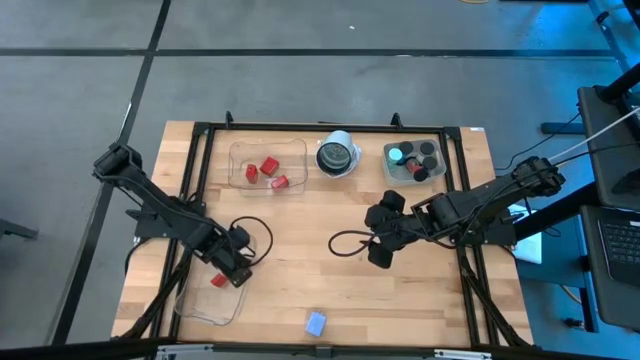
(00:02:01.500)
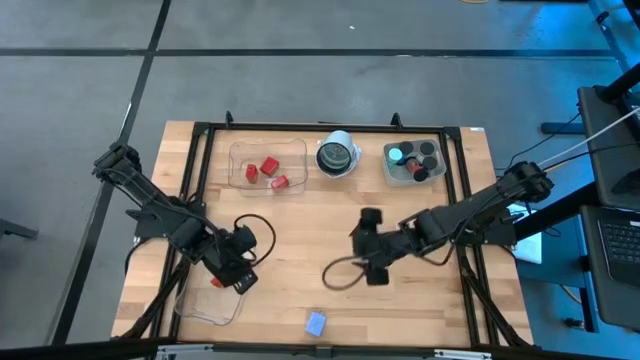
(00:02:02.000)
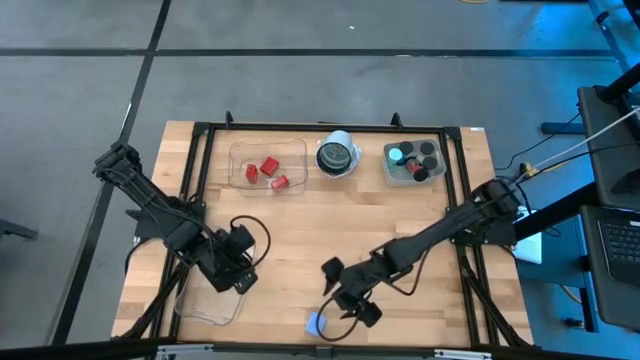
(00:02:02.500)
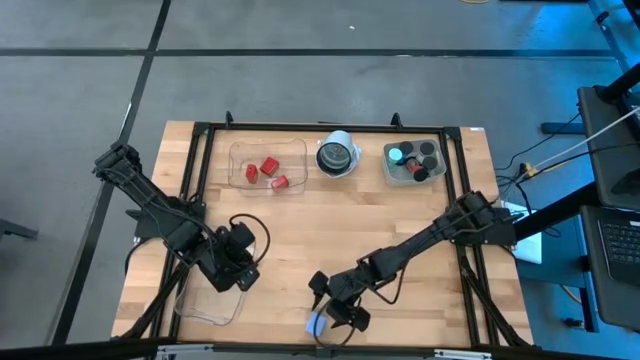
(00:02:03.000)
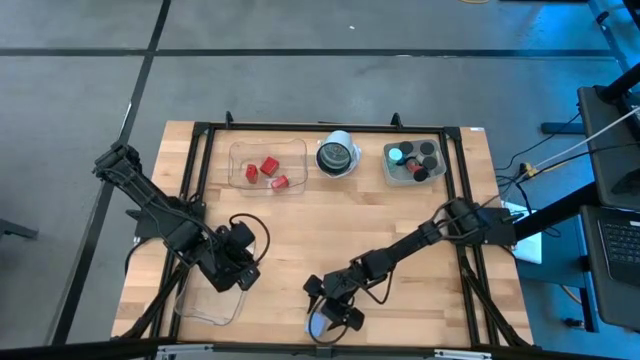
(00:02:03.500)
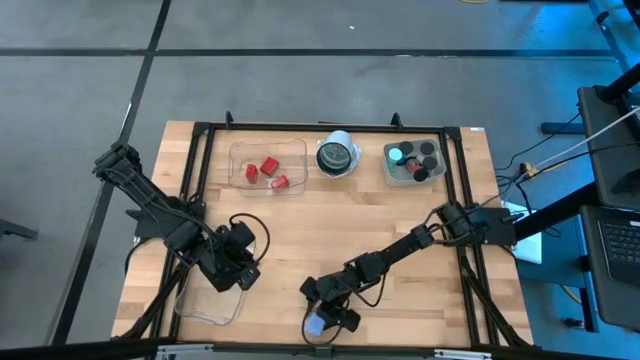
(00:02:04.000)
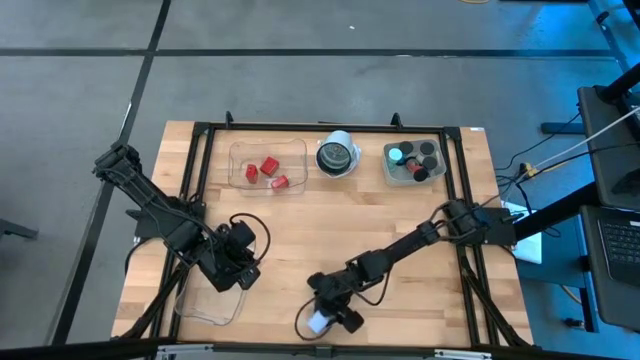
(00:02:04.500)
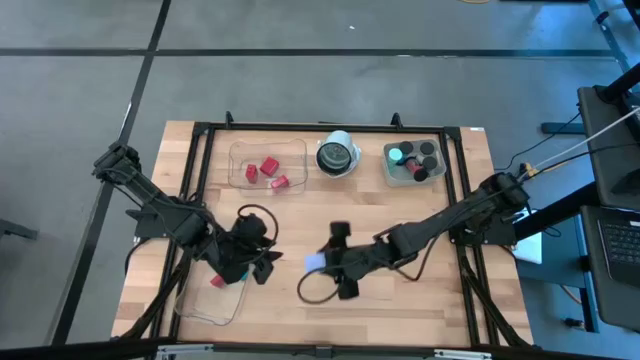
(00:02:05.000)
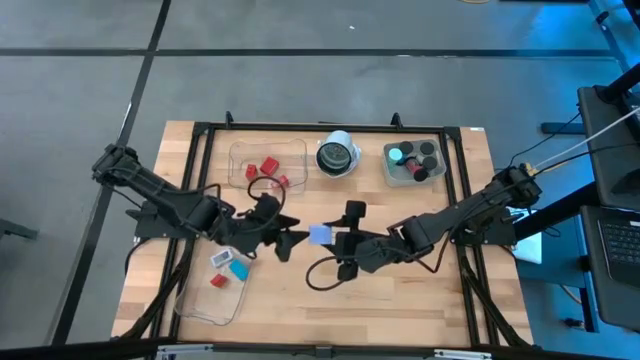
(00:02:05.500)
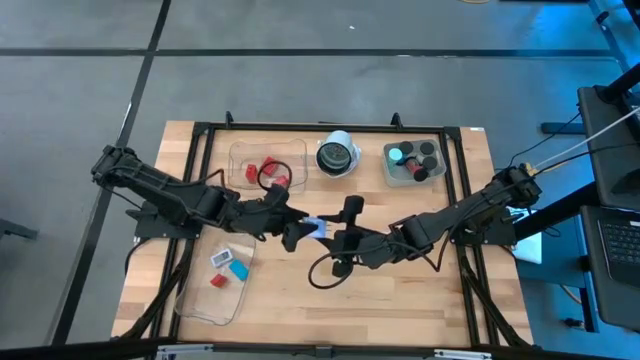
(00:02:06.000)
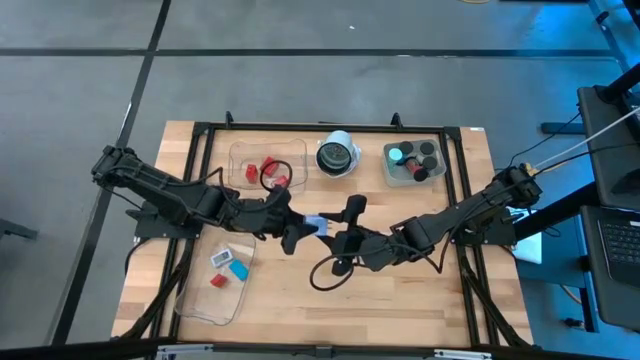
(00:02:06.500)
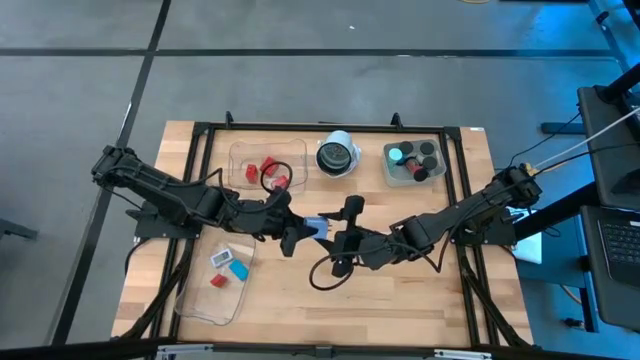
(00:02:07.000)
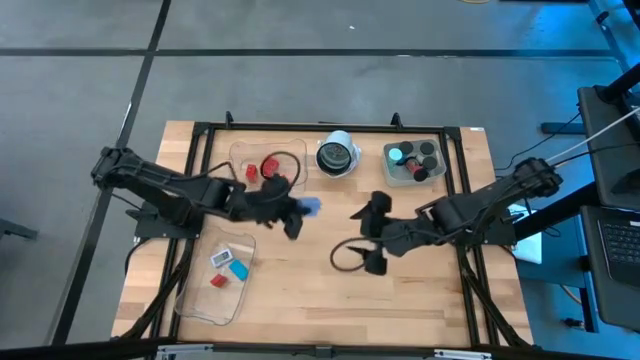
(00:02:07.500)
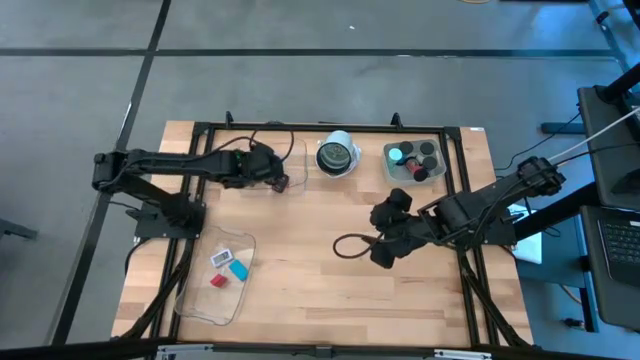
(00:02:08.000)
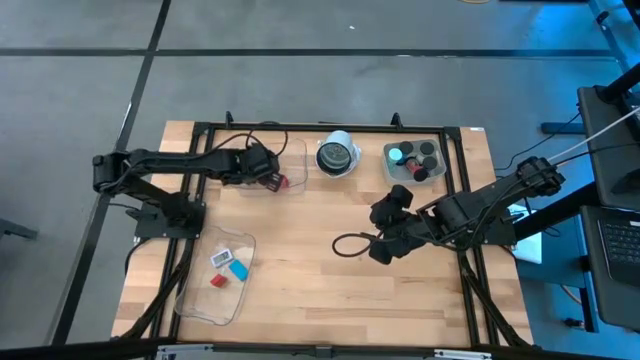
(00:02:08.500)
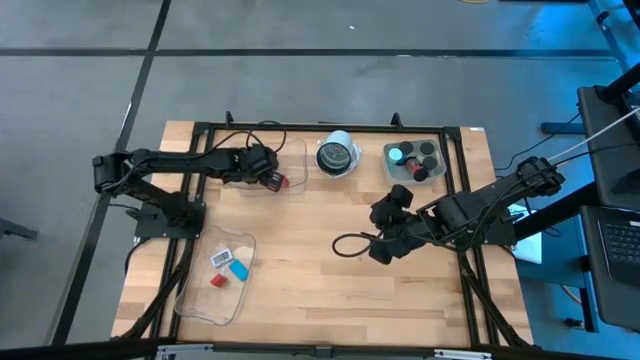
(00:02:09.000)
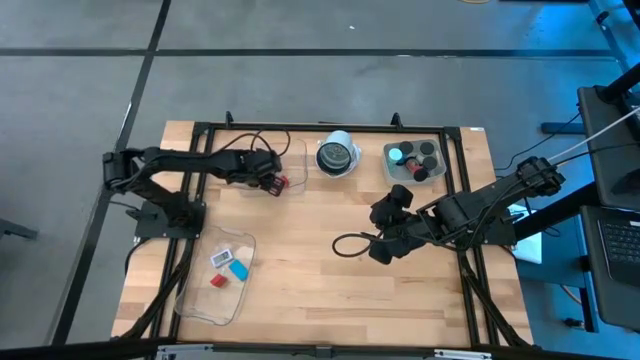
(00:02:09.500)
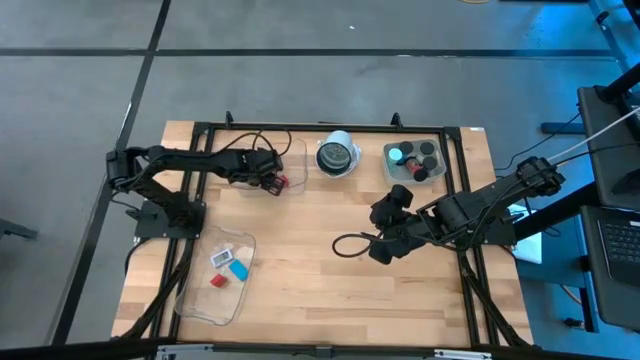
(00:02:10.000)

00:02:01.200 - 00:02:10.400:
Task: Pick & Place Office items
Put the light blue charger adapter into the top transparent bin

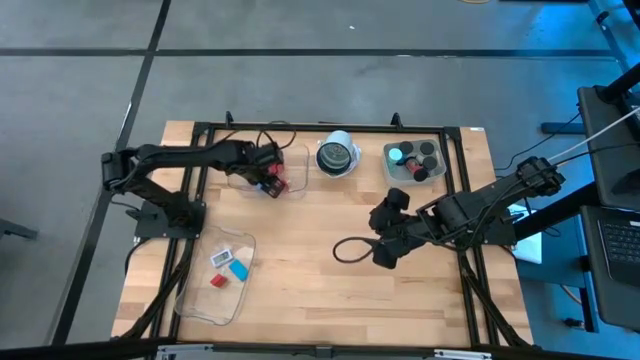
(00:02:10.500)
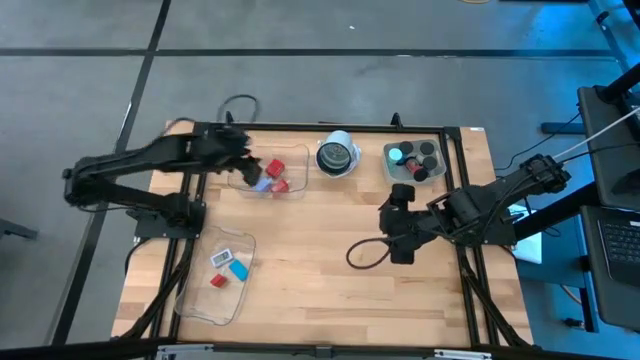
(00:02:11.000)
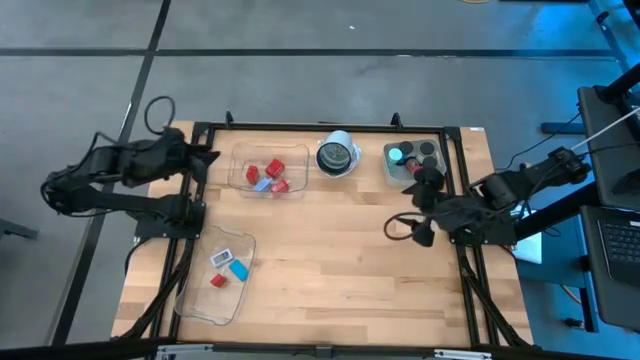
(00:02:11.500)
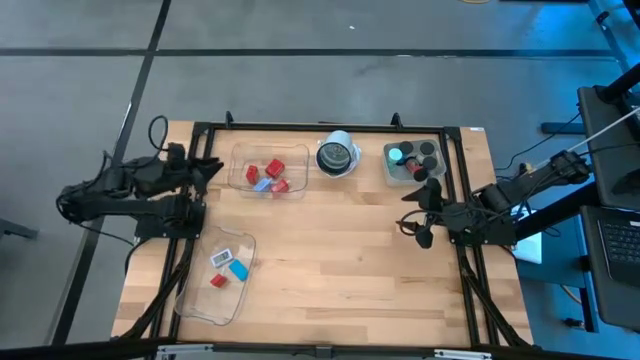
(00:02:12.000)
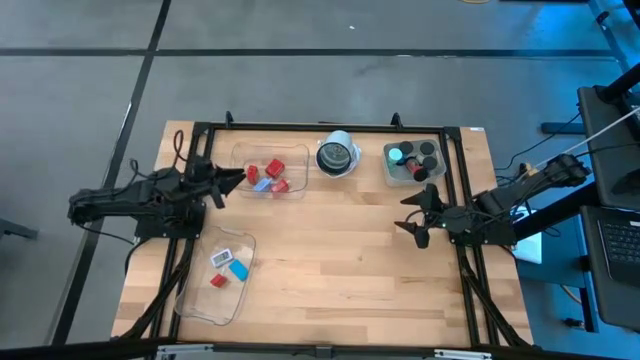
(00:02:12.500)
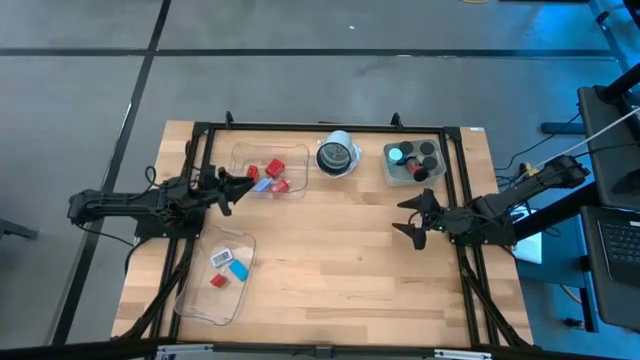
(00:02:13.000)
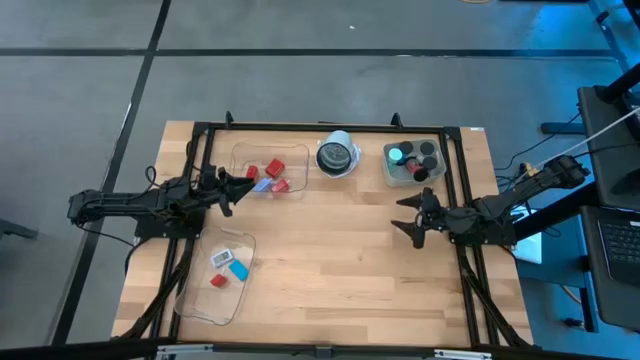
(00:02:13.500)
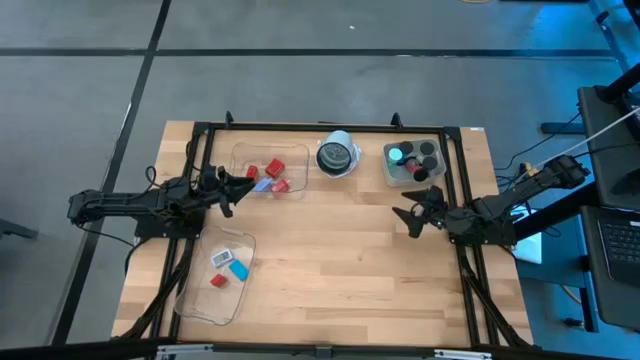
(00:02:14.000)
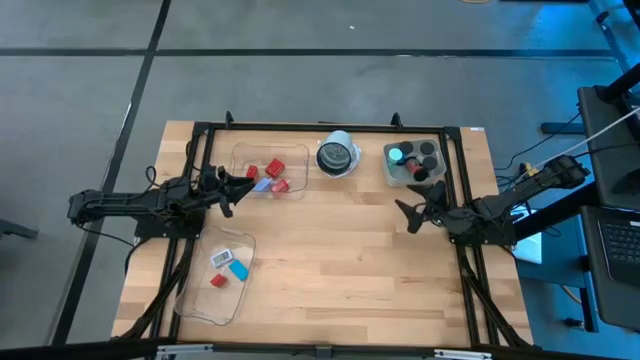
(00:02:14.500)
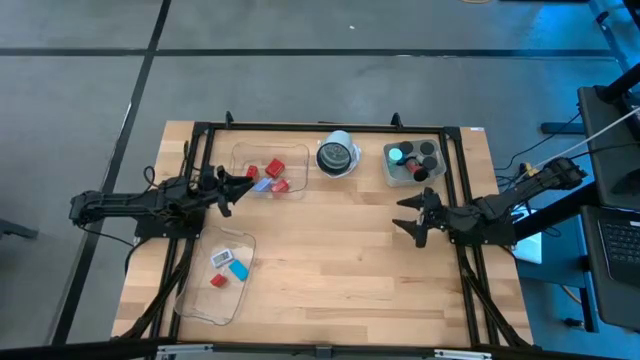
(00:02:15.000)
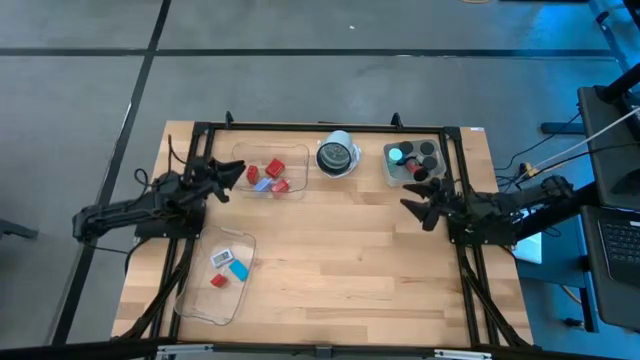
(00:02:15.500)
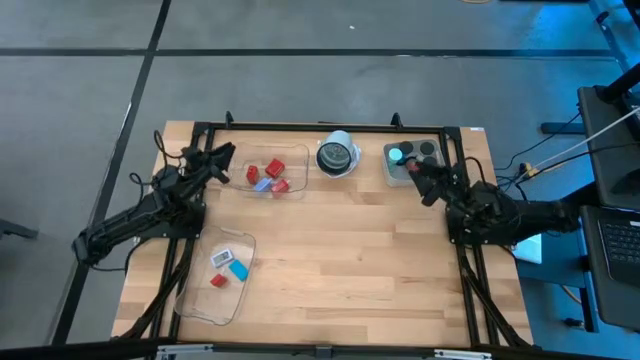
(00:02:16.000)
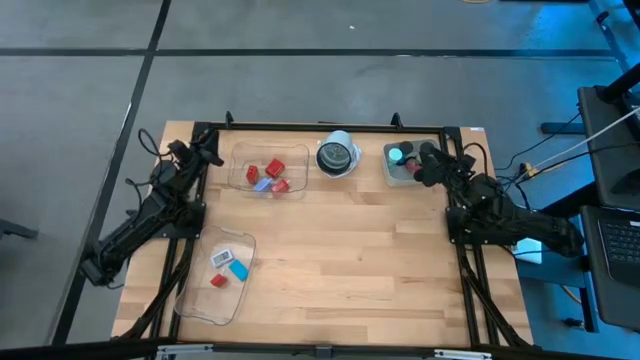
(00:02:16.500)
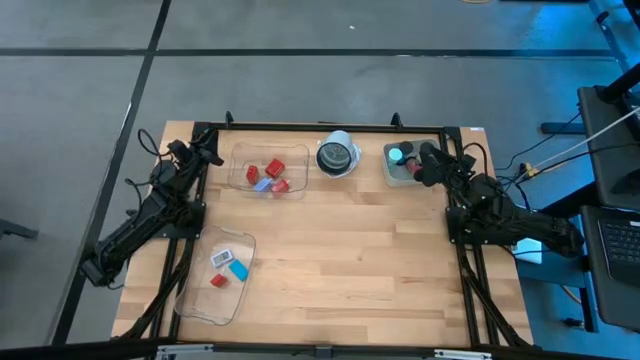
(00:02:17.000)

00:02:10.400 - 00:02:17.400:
Return to Home Position

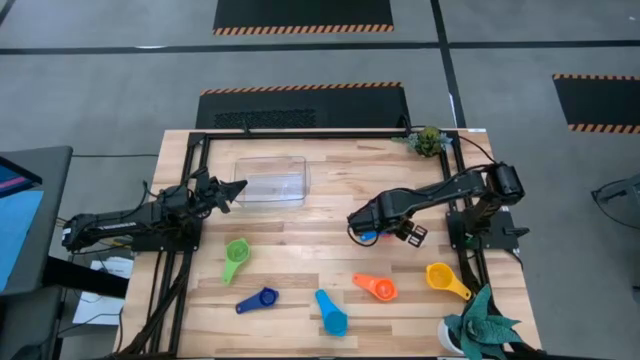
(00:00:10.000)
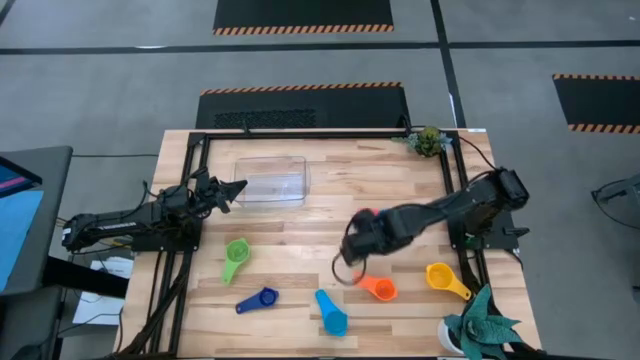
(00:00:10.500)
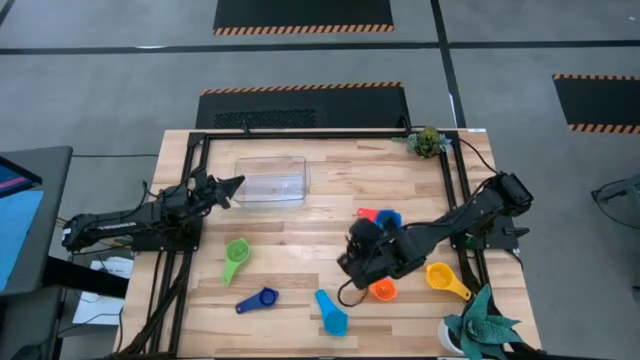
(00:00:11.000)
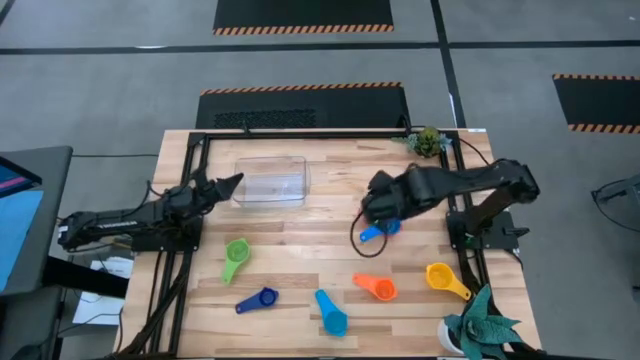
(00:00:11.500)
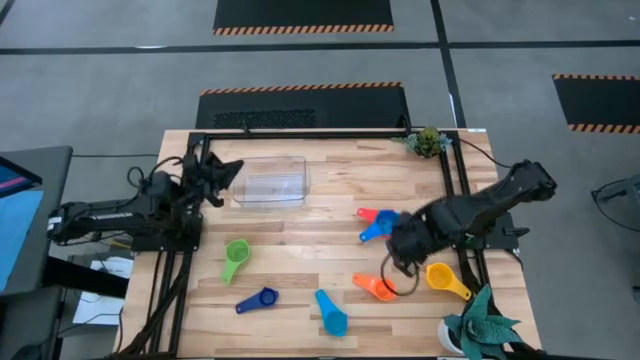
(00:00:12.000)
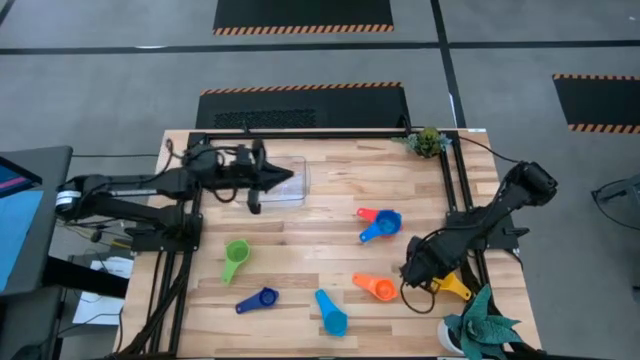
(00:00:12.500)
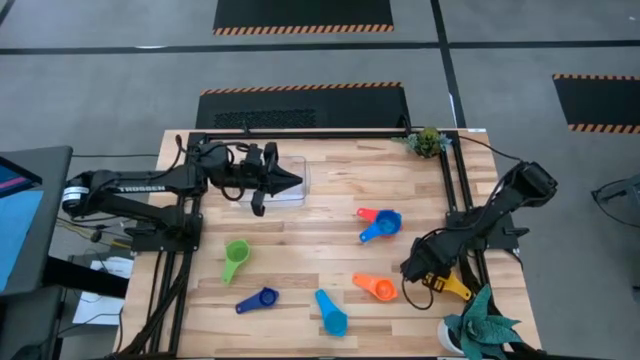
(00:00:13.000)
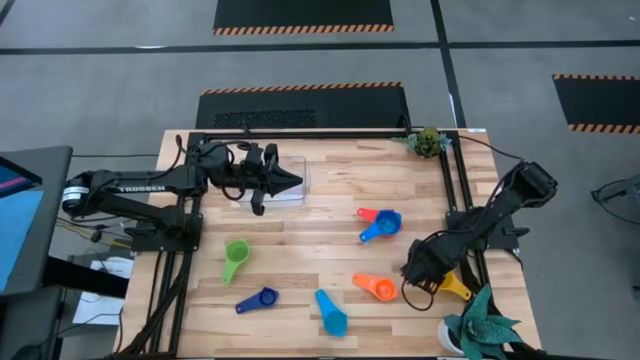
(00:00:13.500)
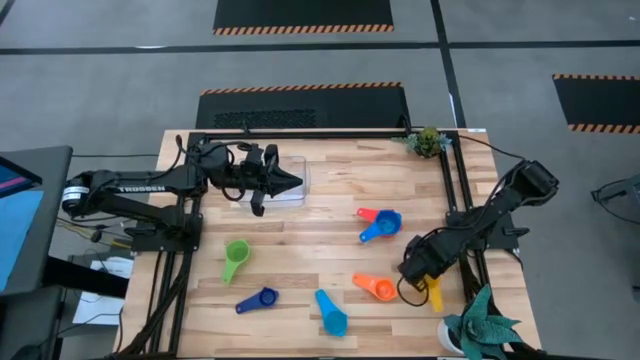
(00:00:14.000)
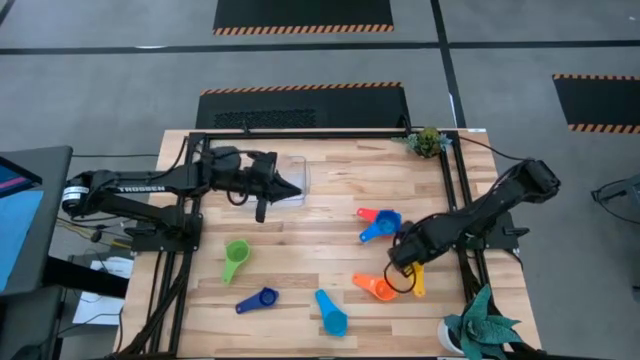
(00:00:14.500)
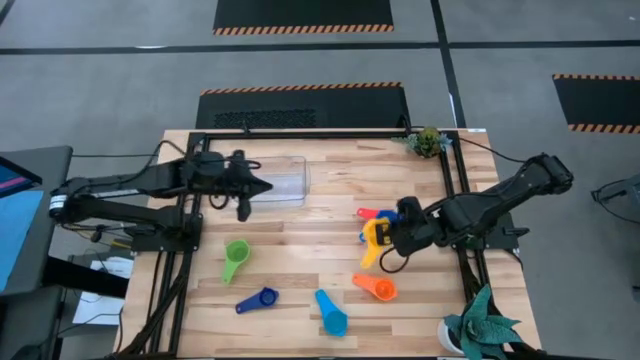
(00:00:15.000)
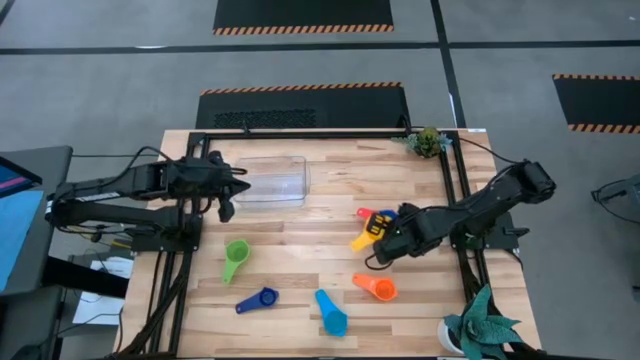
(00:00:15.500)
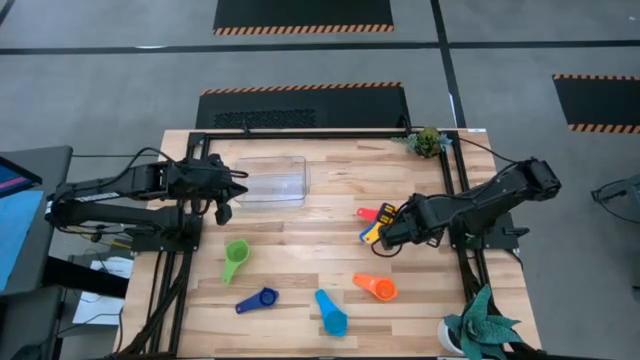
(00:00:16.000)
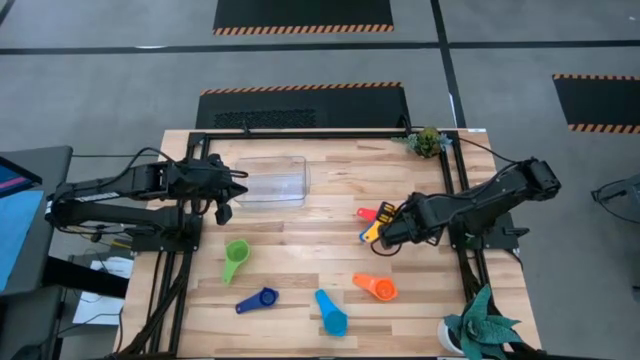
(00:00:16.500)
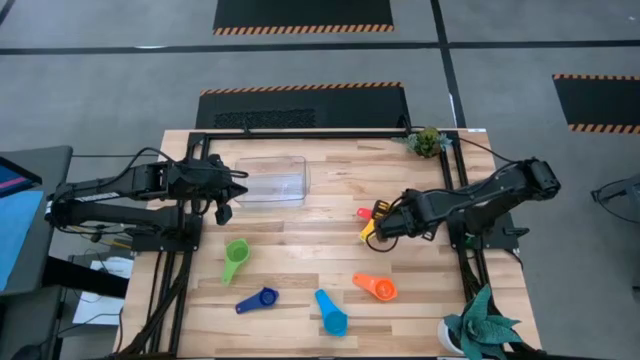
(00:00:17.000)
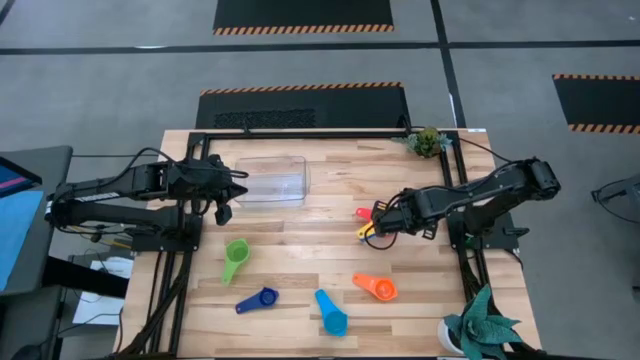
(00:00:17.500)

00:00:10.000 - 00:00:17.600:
Task: Nest measuring cups in basket
Stack the yellow measuring cup on top of the blue measuring cup
